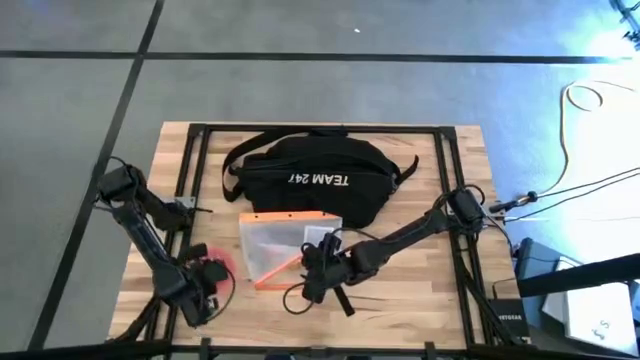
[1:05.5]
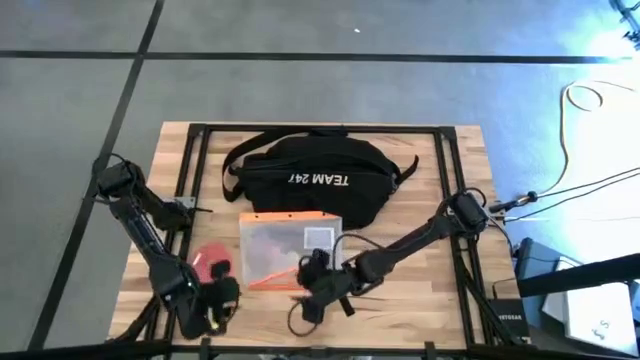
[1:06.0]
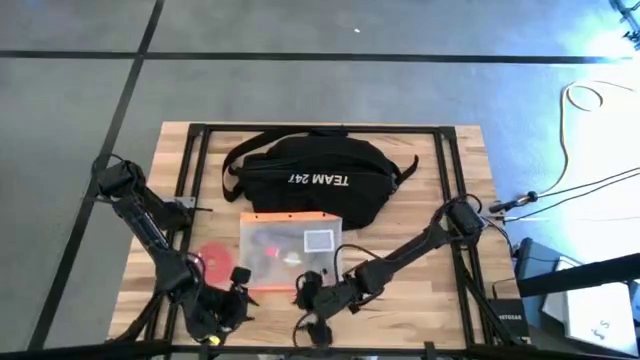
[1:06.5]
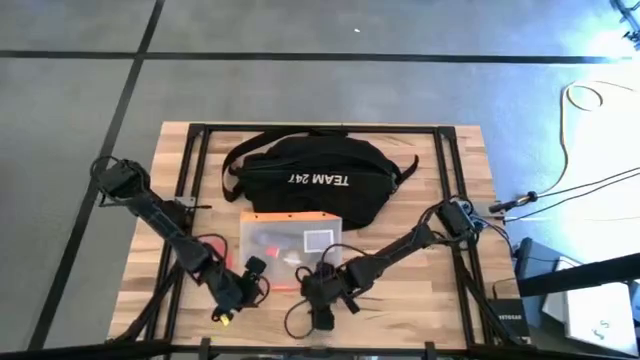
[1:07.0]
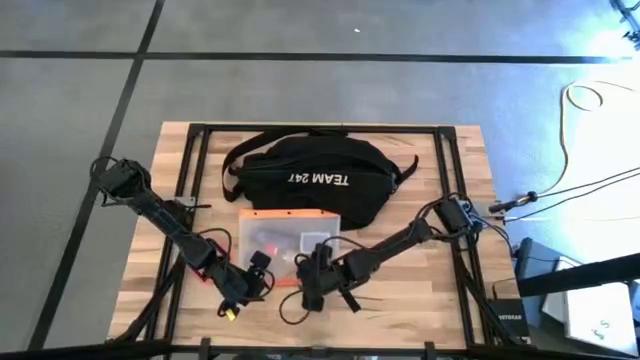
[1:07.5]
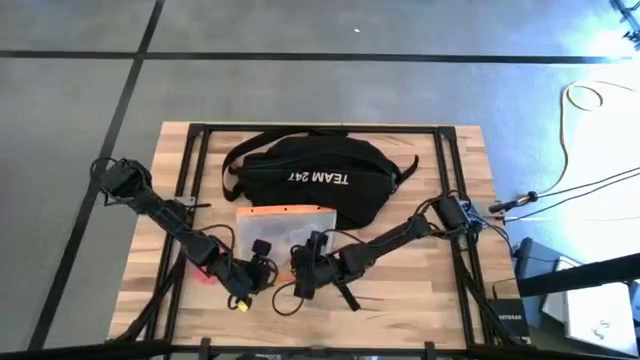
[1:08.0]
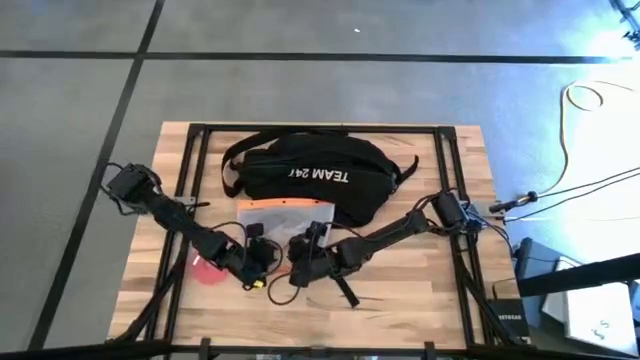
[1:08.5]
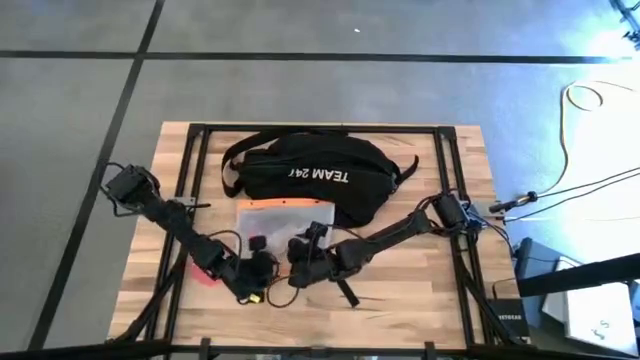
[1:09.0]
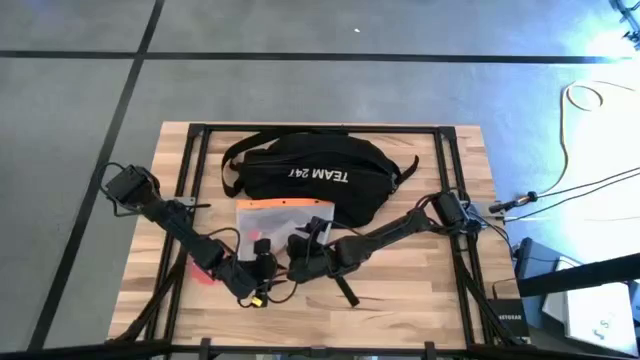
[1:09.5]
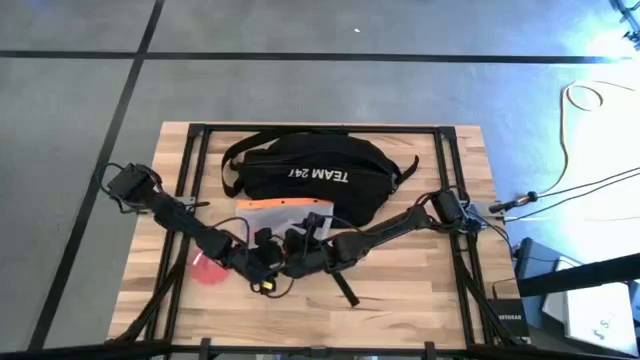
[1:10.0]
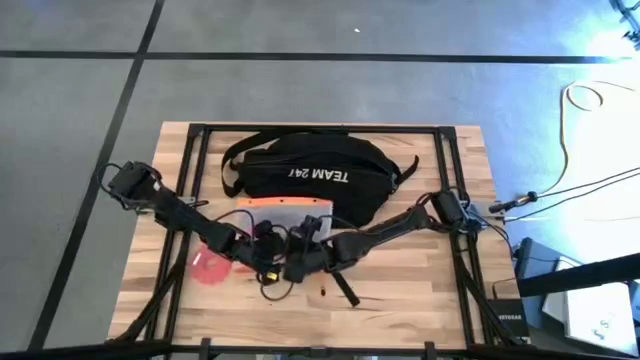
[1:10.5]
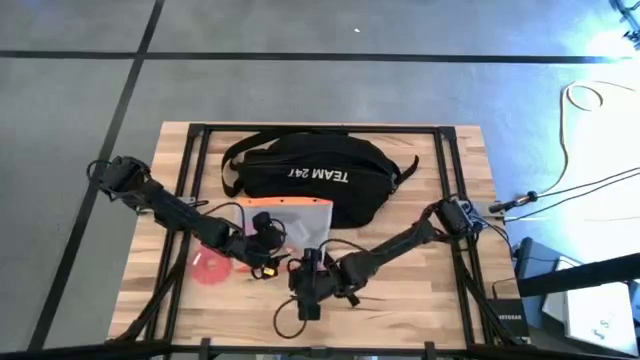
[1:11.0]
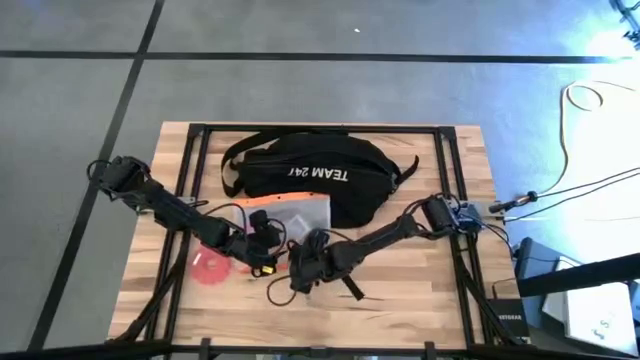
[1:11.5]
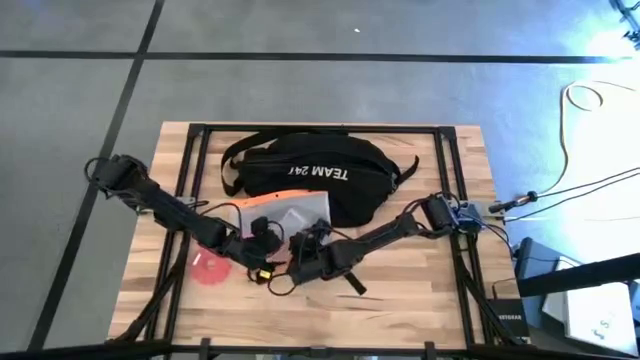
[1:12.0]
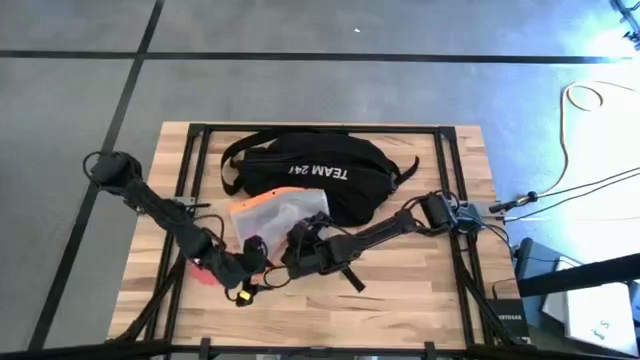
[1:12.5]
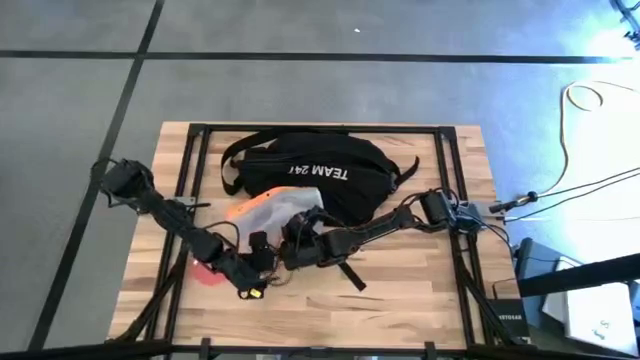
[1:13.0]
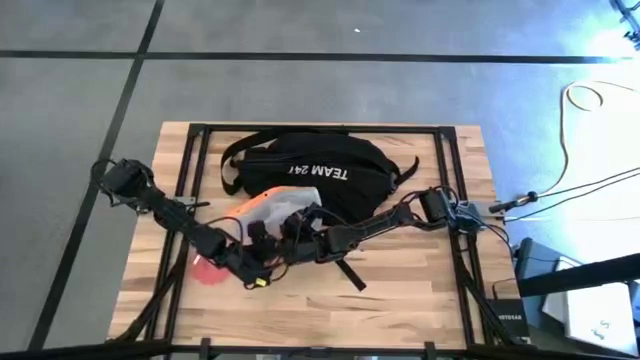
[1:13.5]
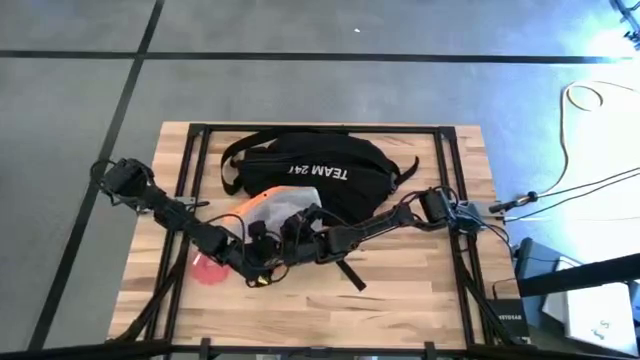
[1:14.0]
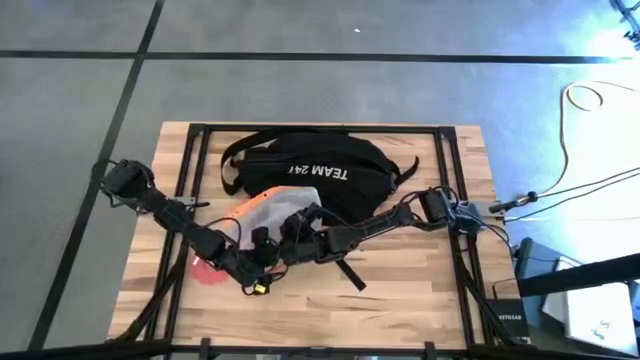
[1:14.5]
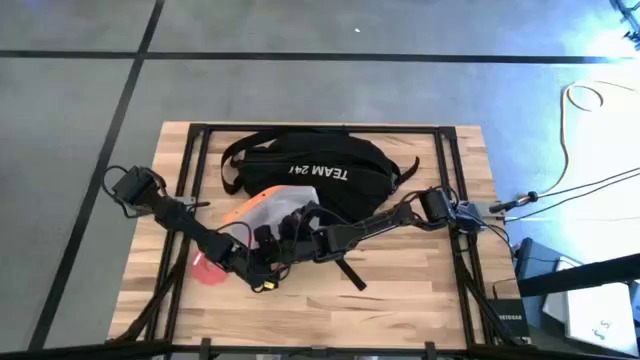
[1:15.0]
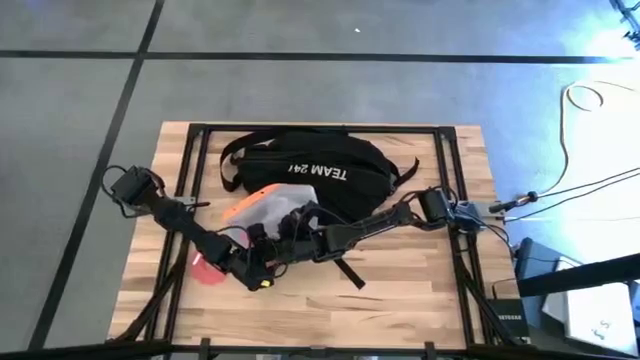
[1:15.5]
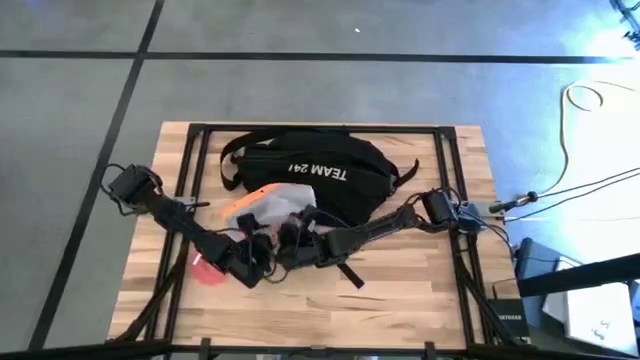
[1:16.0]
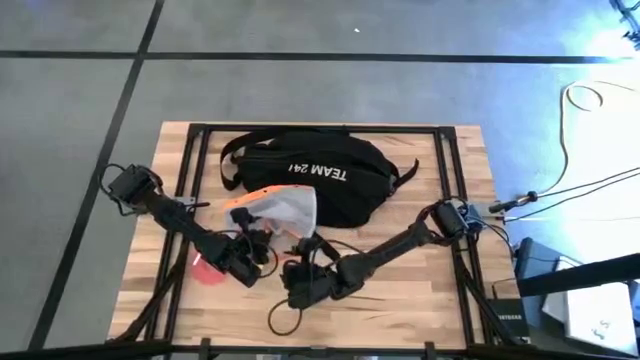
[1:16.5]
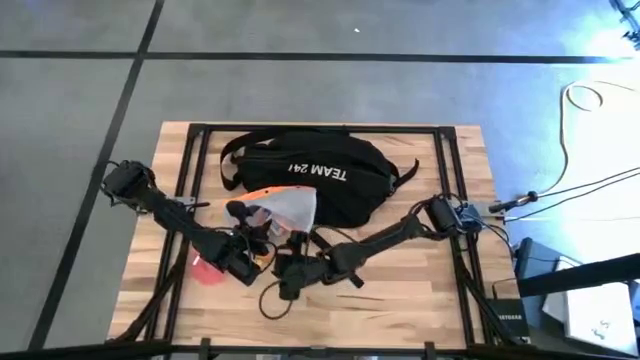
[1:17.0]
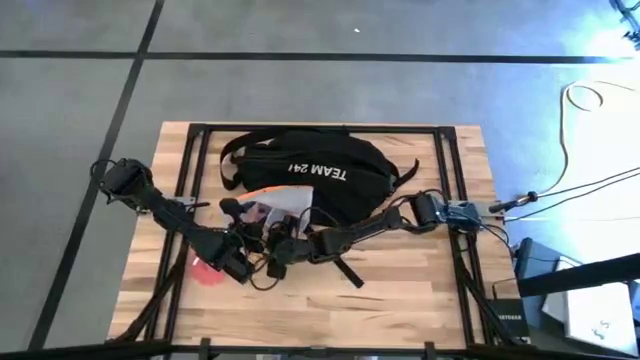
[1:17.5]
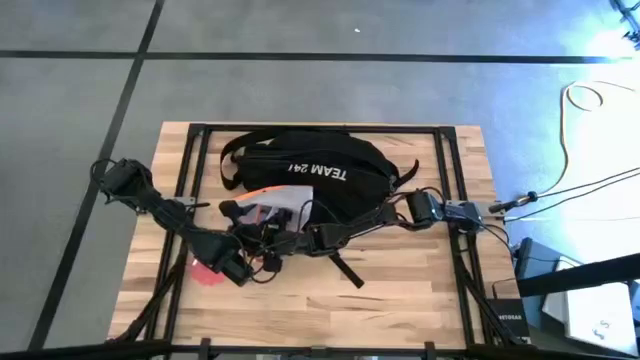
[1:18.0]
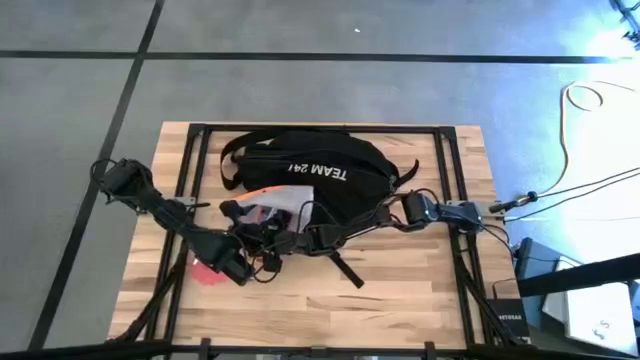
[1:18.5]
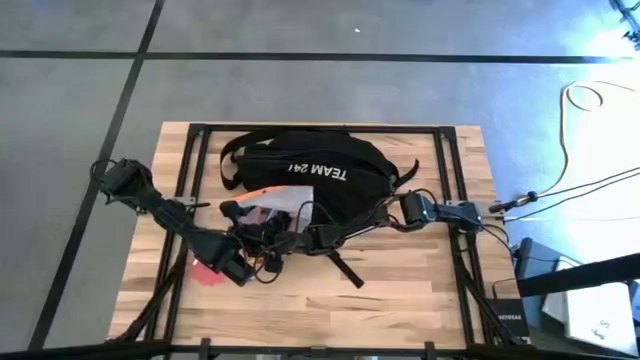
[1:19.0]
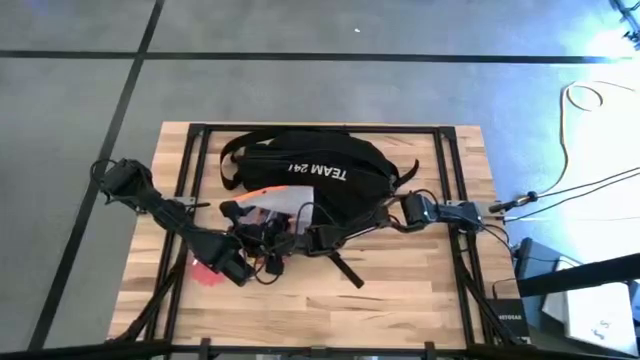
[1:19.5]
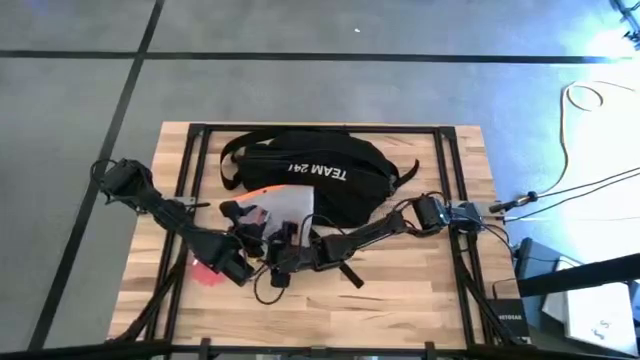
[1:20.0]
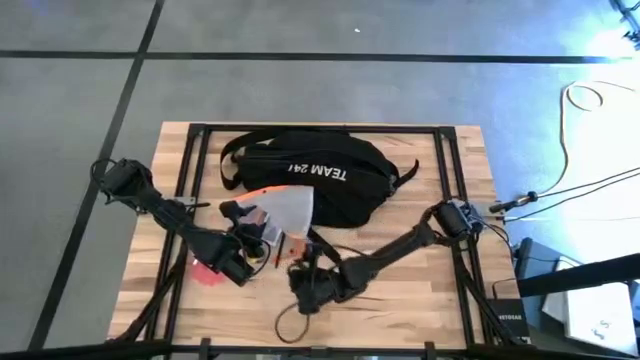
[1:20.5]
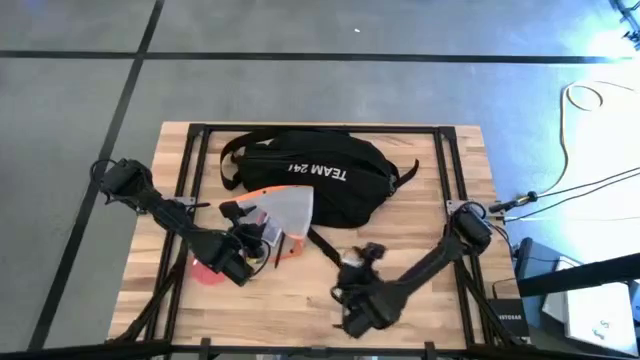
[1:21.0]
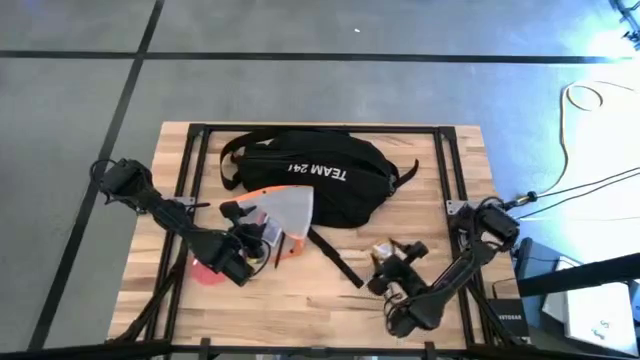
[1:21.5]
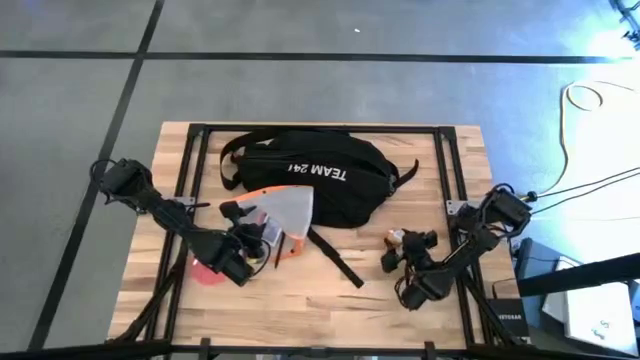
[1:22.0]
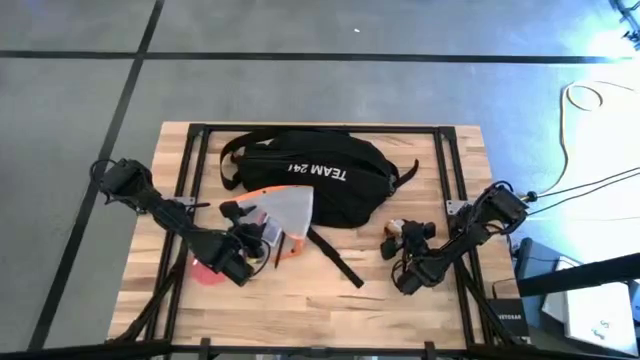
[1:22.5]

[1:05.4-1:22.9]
Task: Unpack backpack
Remove the candle wax box from the white zip bag
